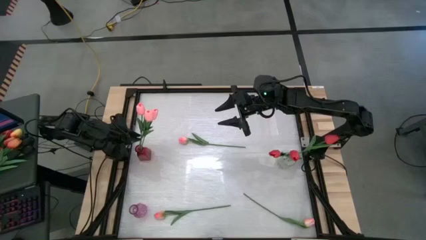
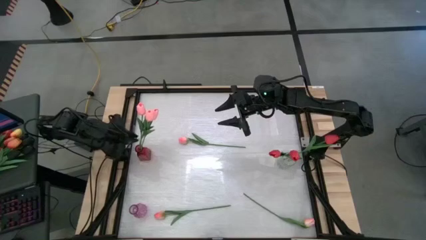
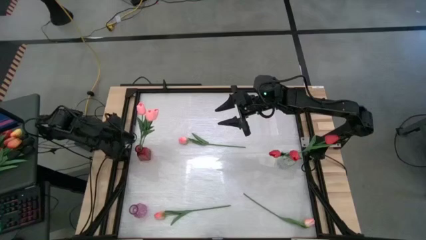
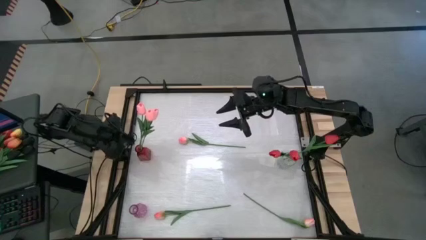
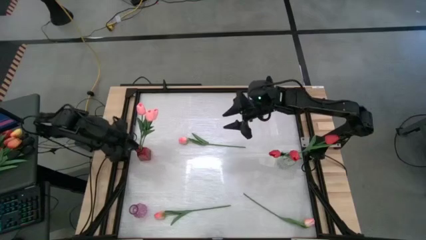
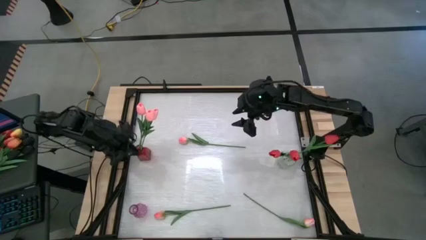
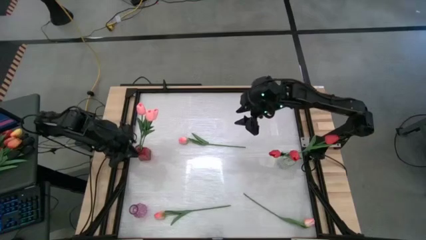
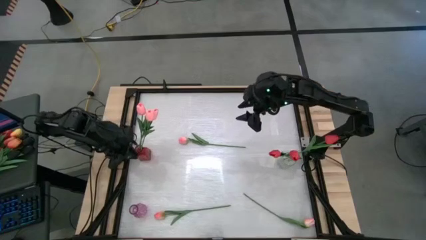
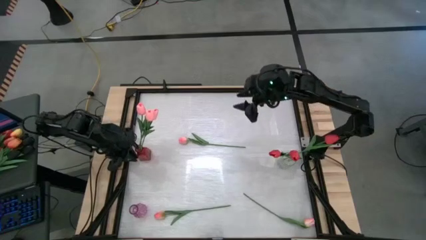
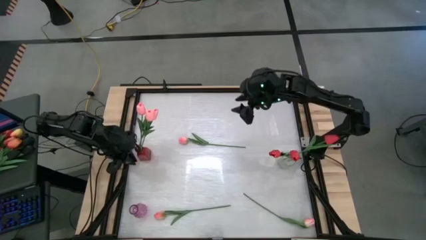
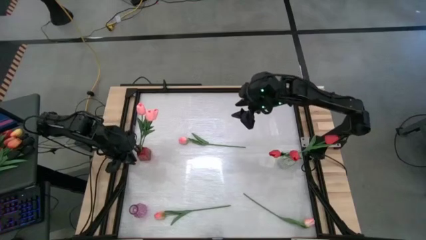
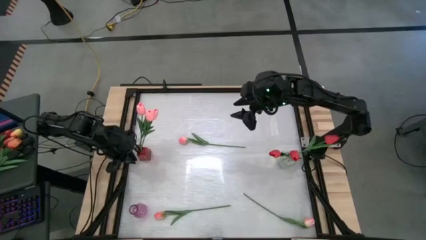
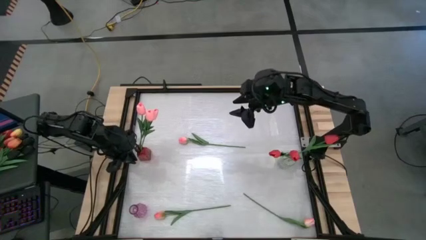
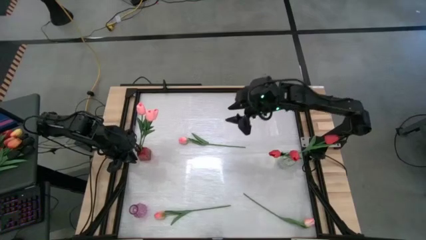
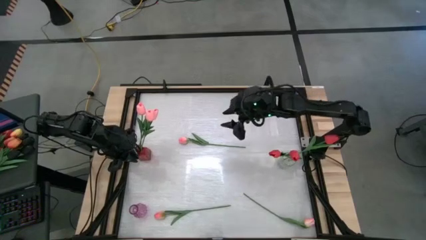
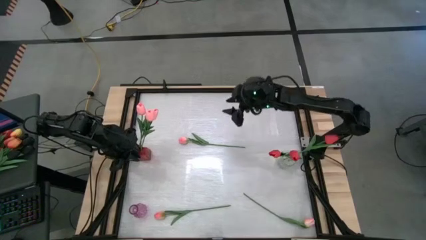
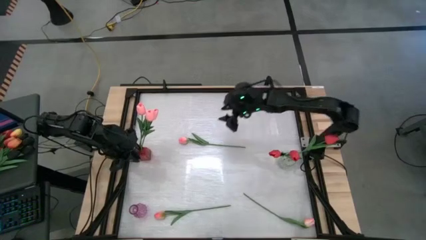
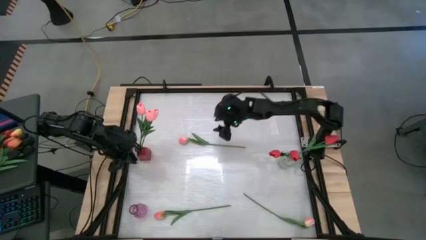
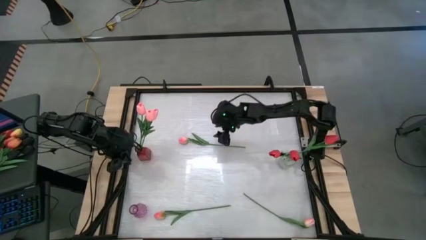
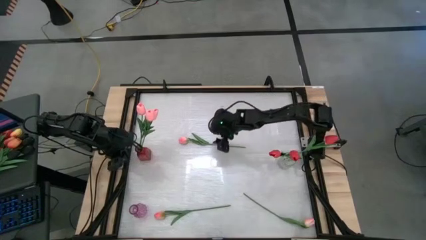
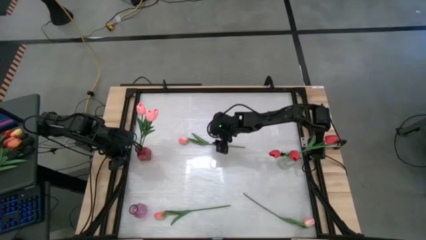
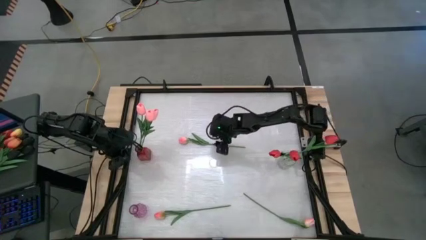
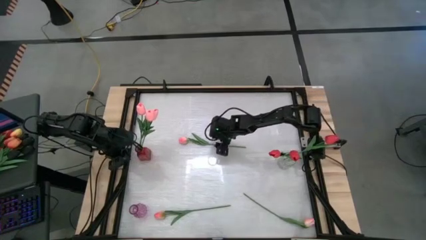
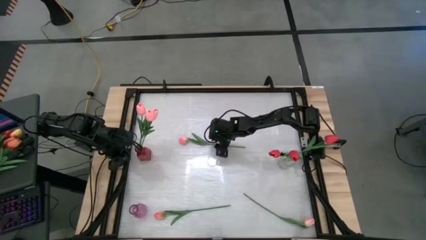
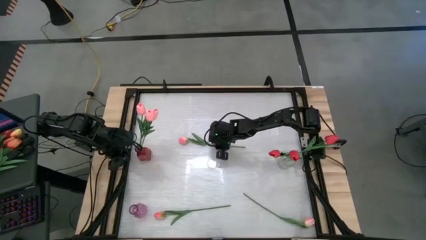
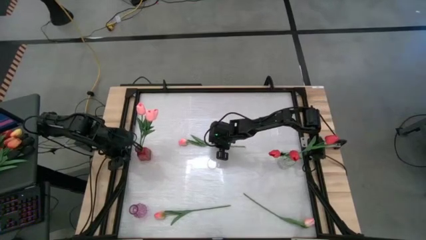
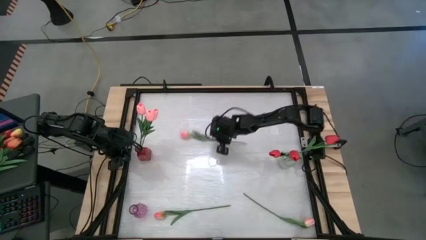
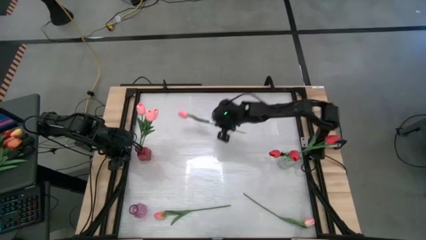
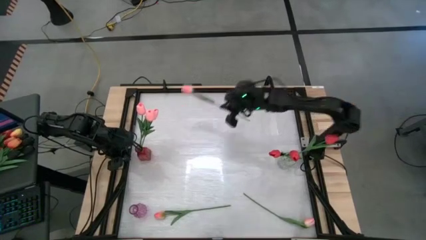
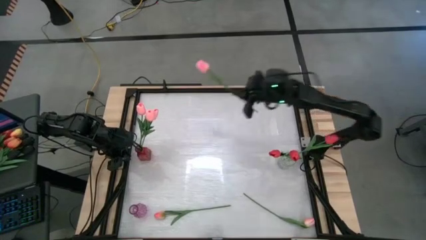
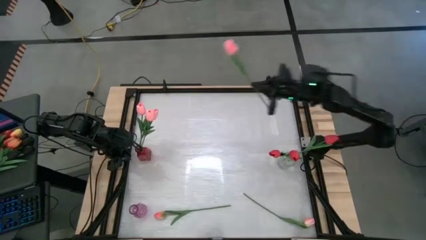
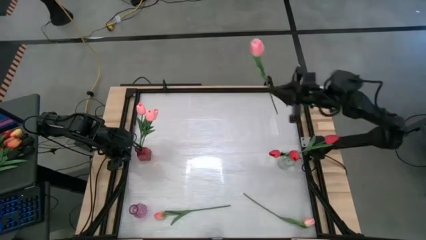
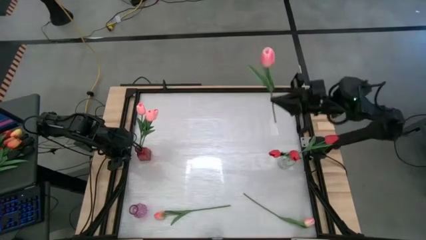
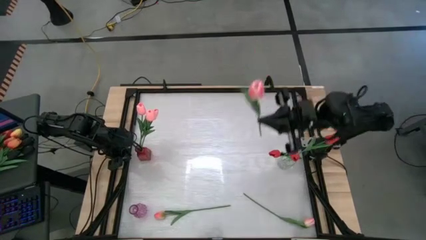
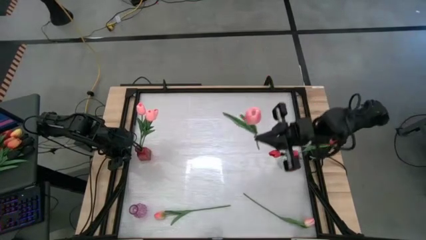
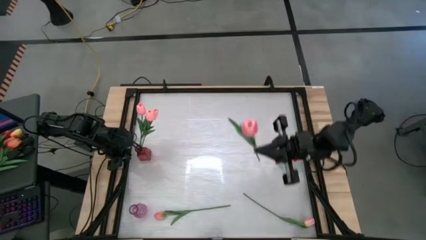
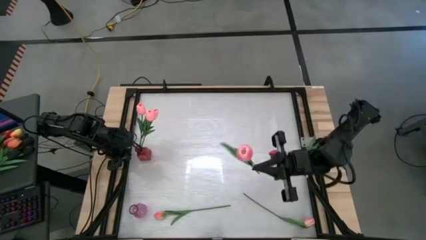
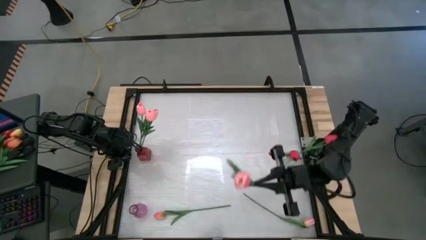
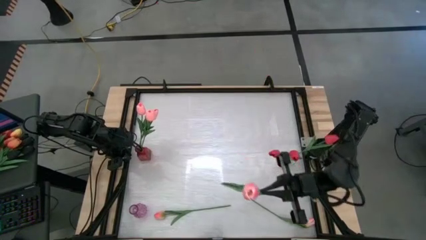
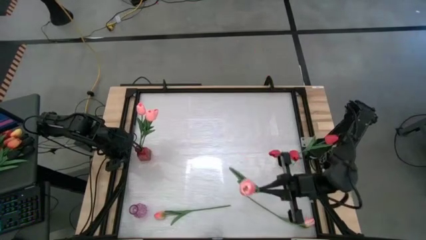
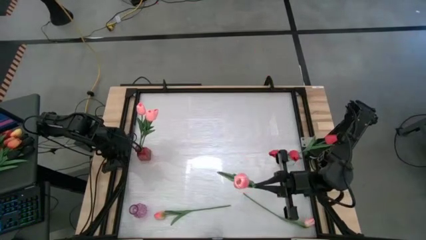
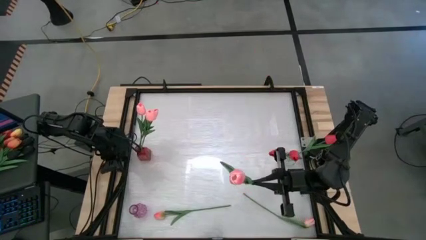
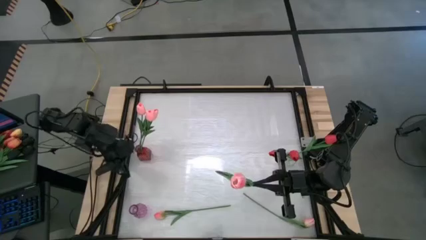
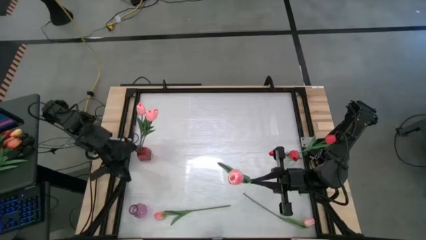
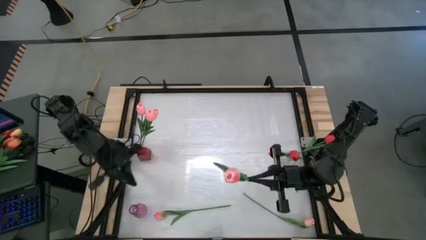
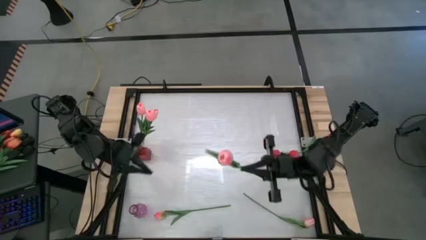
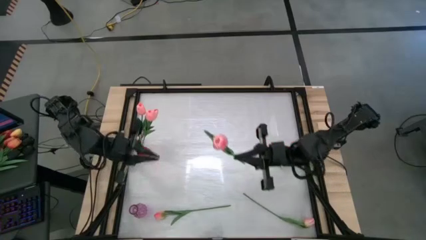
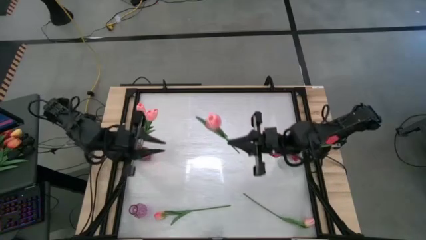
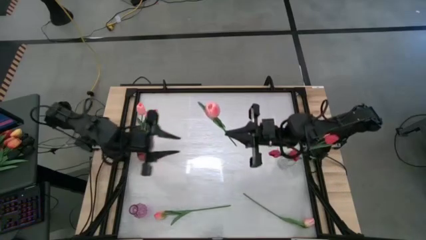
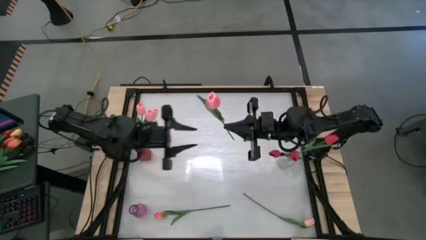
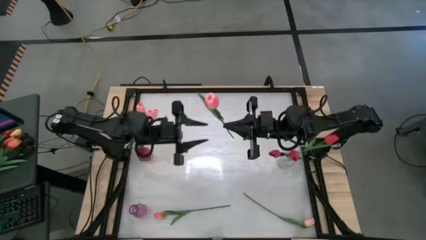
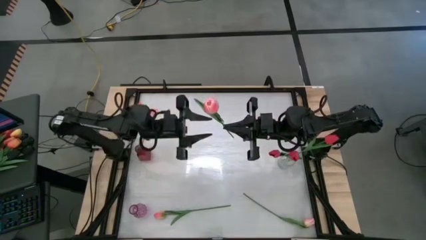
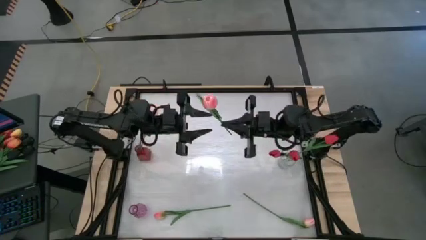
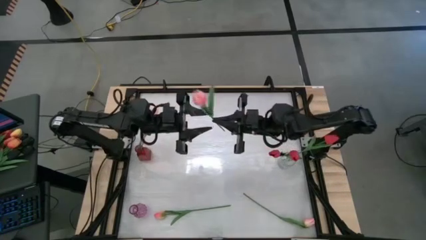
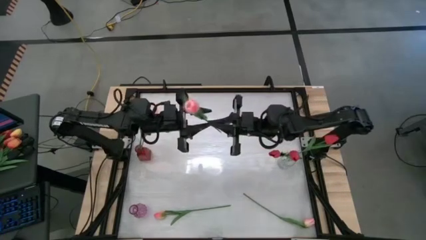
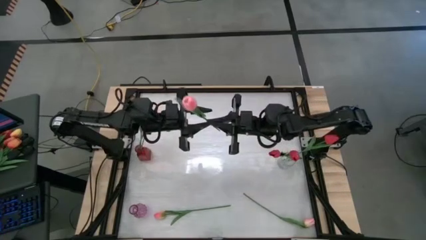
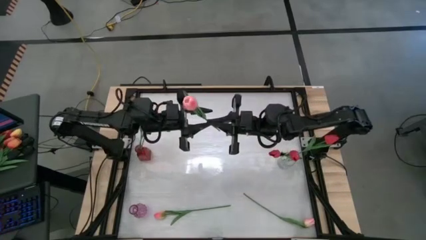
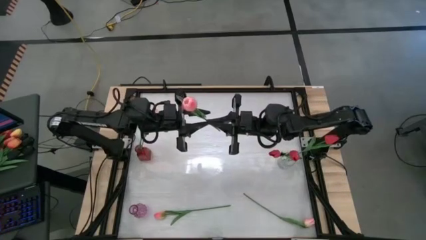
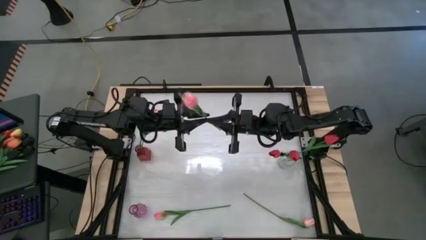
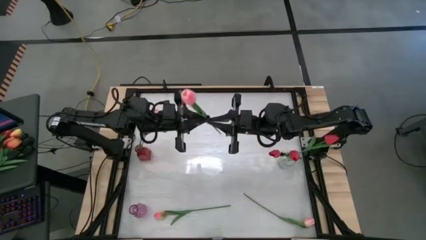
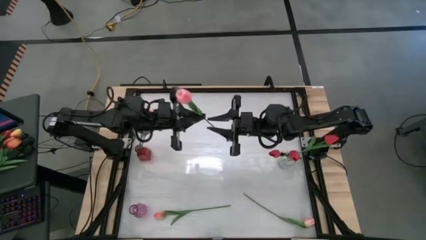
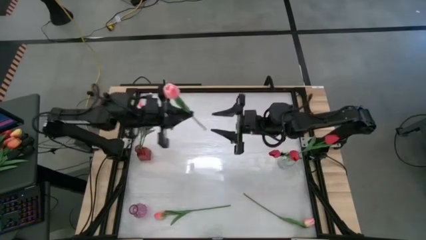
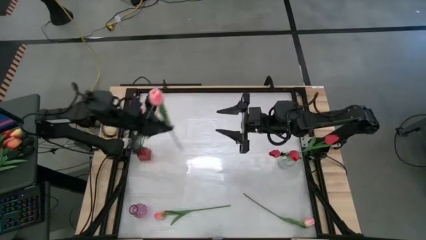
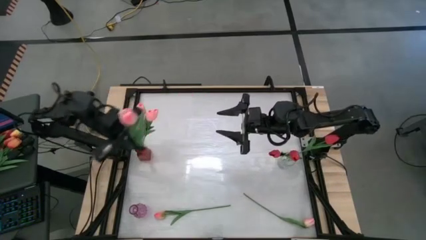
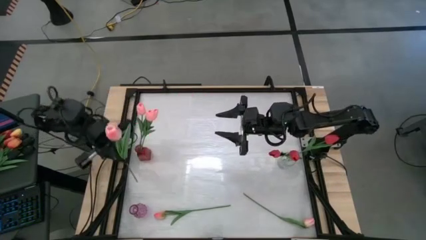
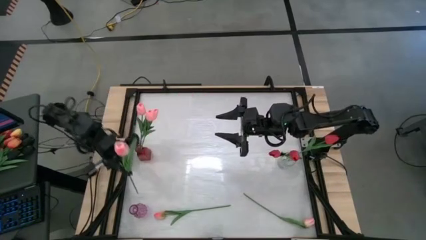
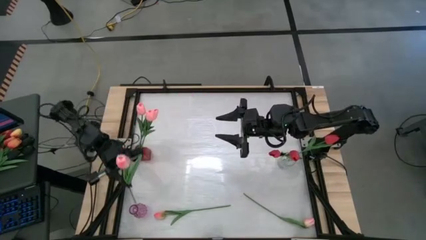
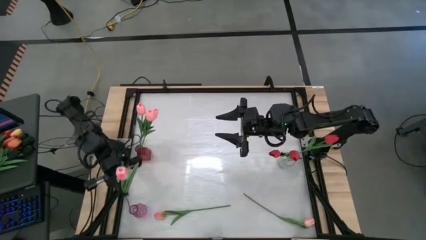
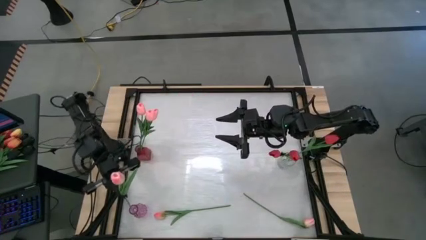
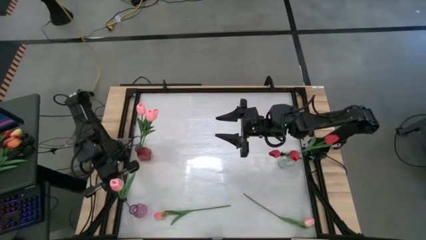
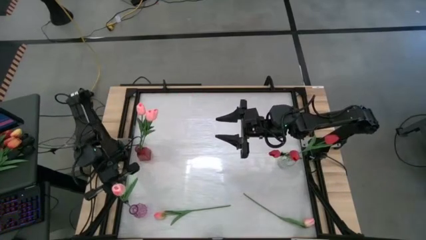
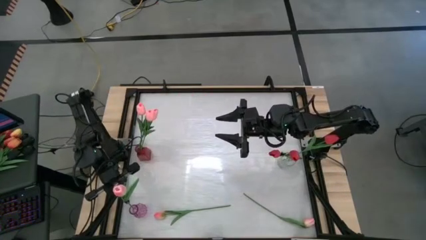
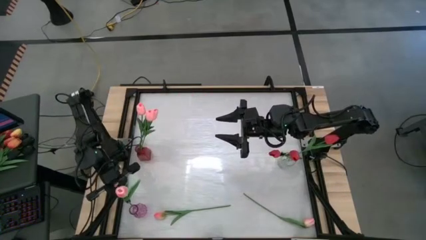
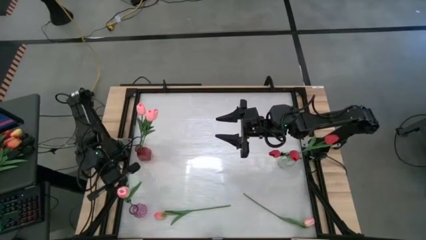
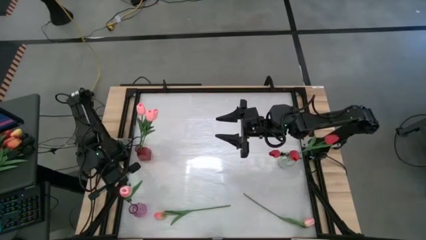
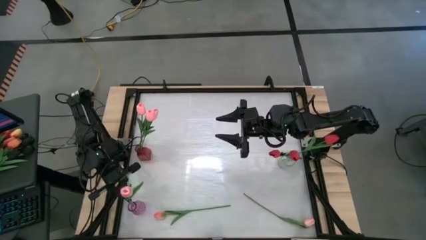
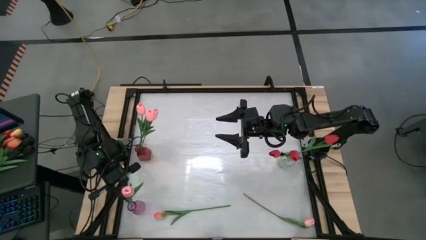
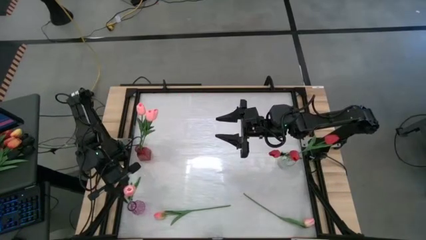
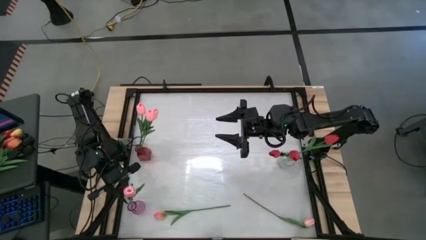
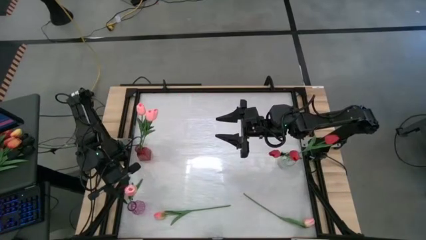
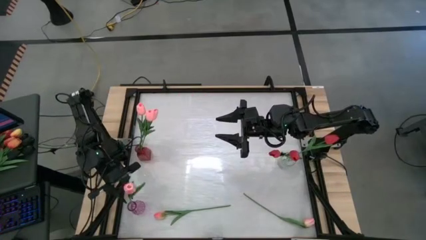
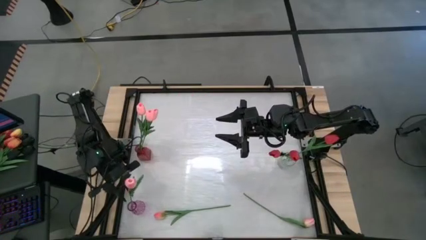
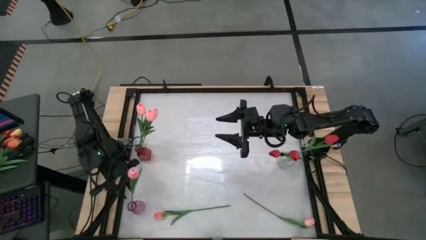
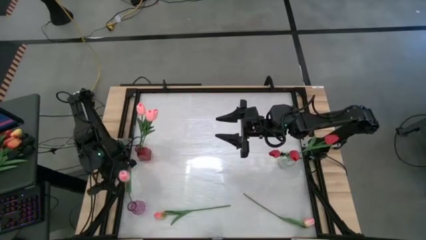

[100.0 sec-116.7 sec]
Task: Sort flowers into vase by color
Put the top light pink flower into the purple flower vase
